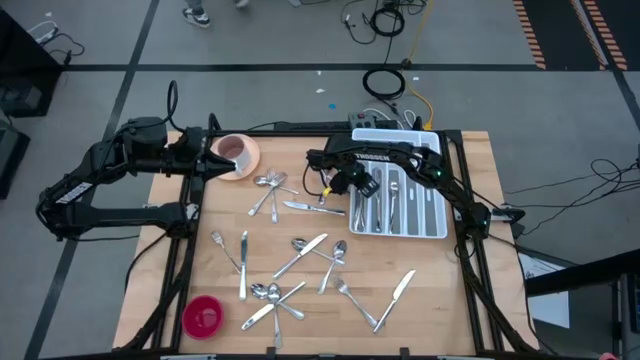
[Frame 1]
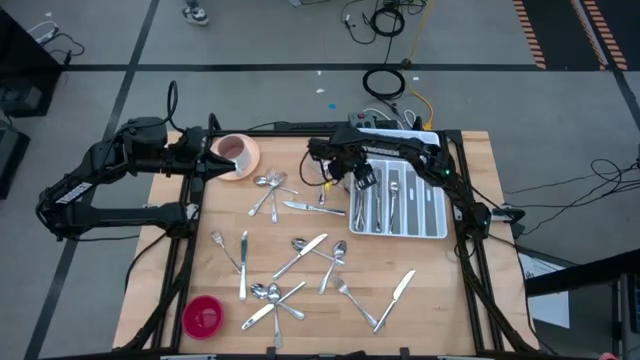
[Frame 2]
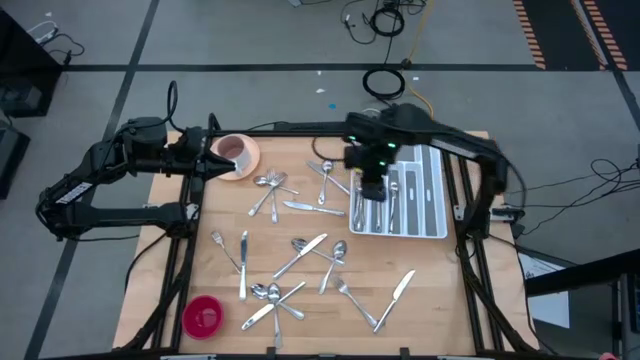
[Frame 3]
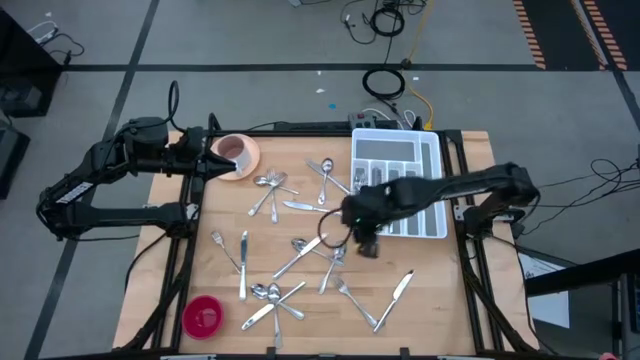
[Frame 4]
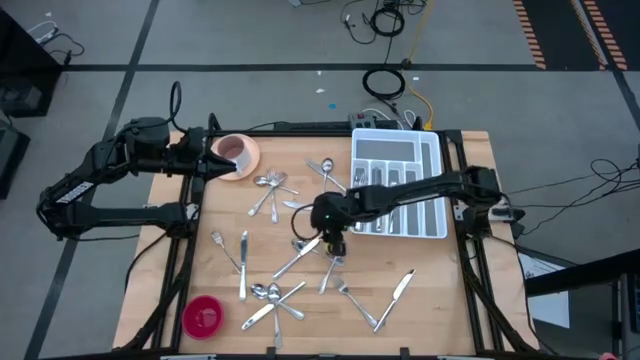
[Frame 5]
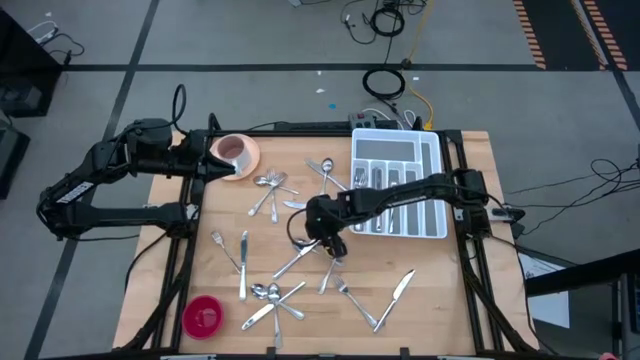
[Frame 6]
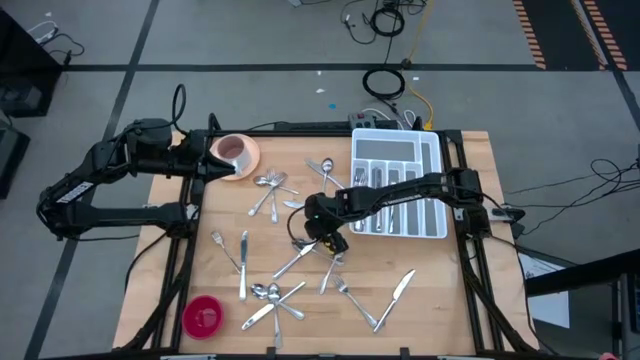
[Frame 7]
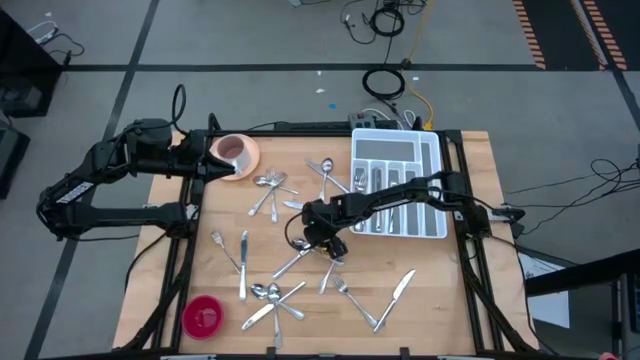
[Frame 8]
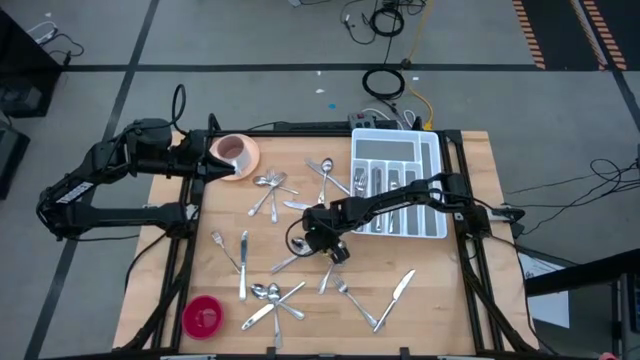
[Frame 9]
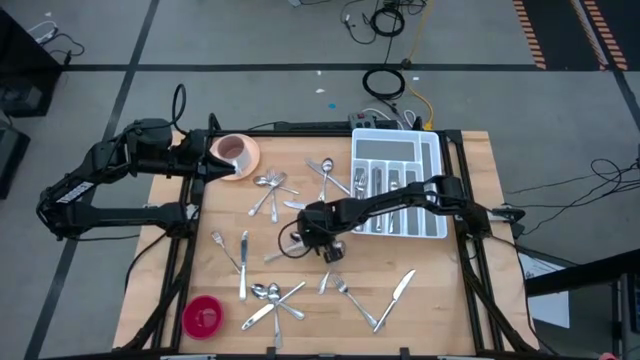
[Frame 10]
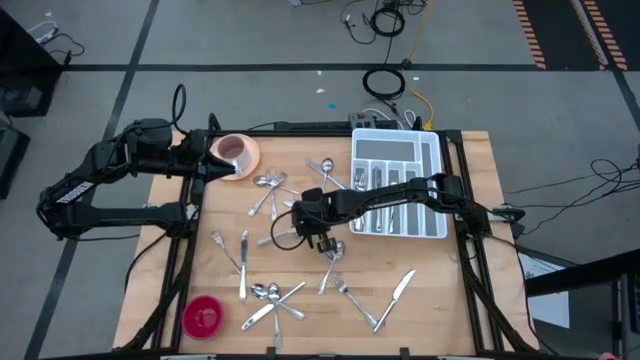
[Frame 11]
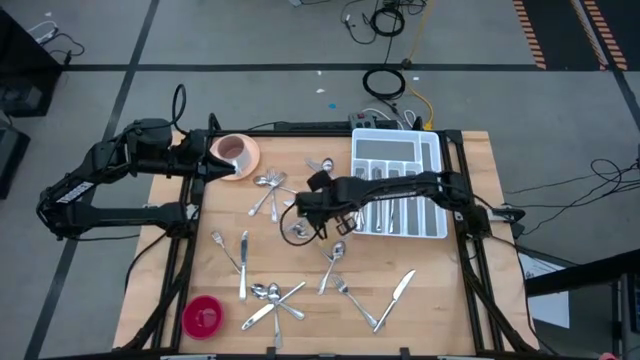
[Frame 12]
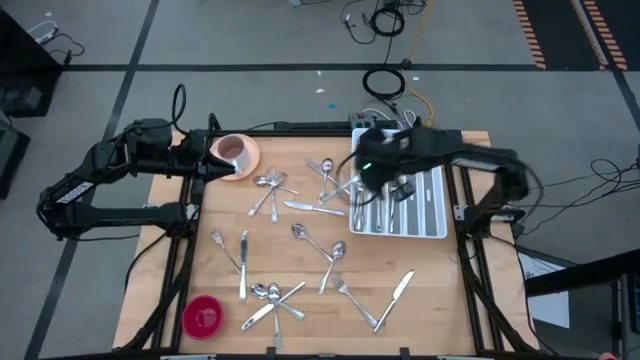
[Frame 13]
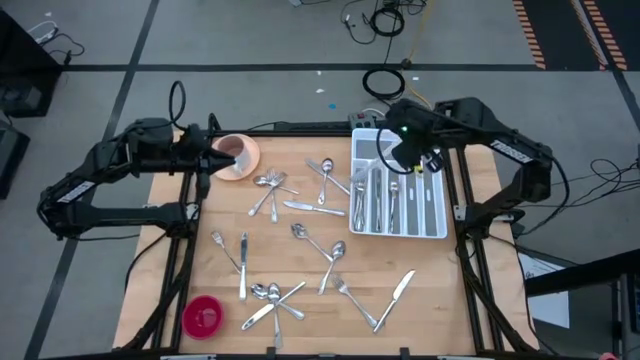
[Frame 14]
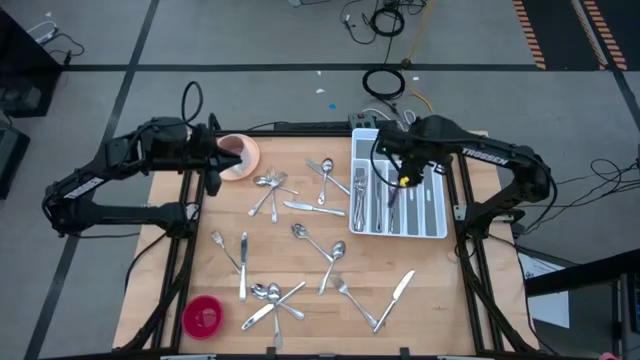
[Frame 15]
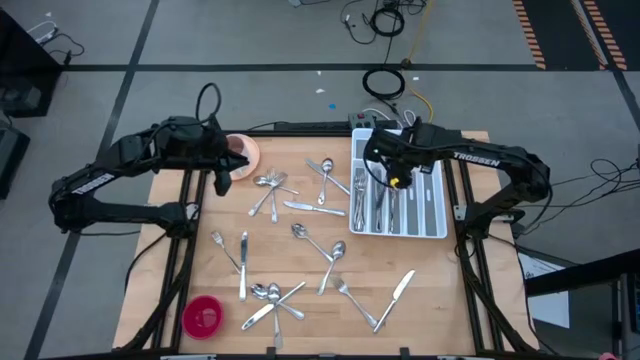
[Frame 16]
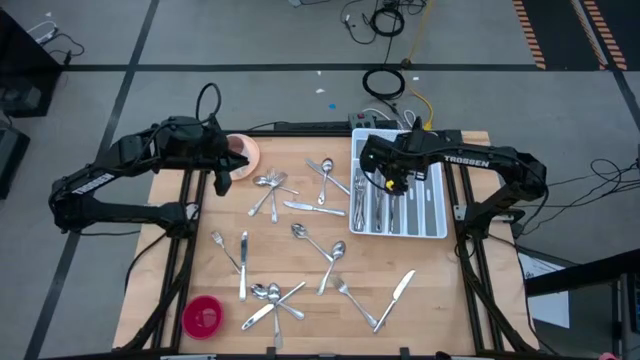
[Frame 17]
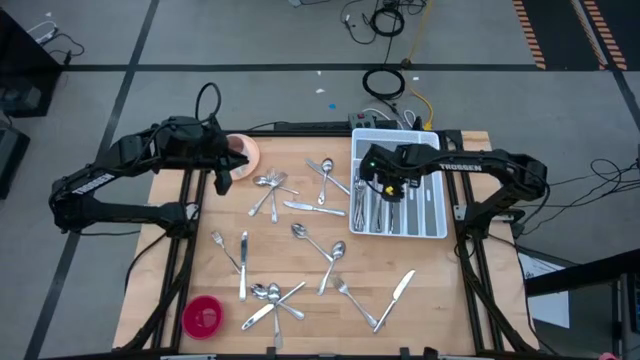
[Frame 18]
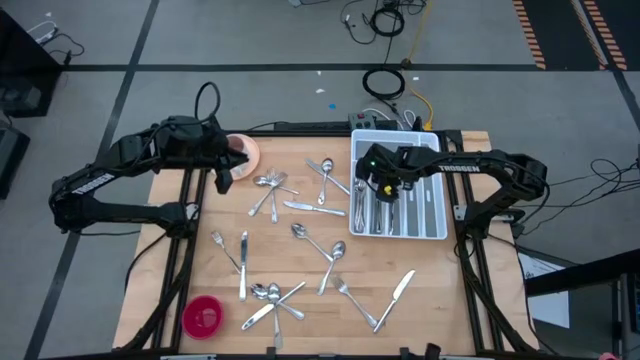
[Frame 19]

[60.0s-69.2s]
Task: Sort silverware
Put the silver knife into the white silverware tray

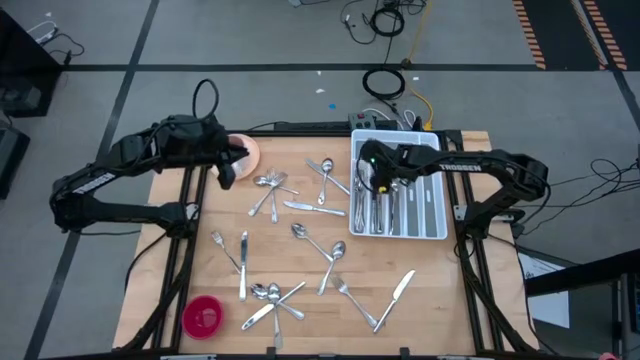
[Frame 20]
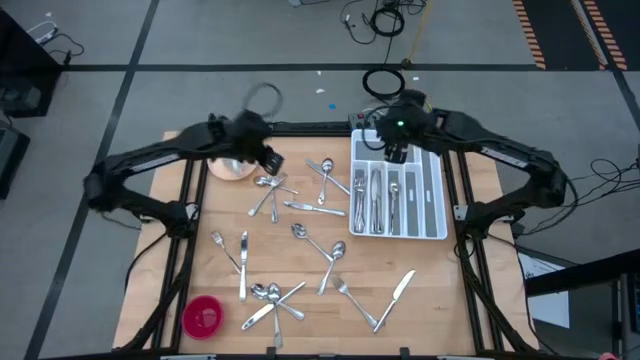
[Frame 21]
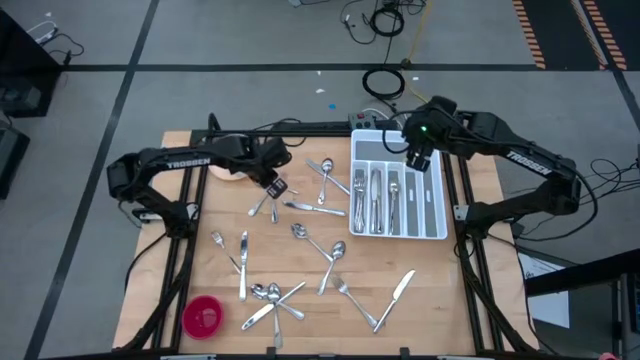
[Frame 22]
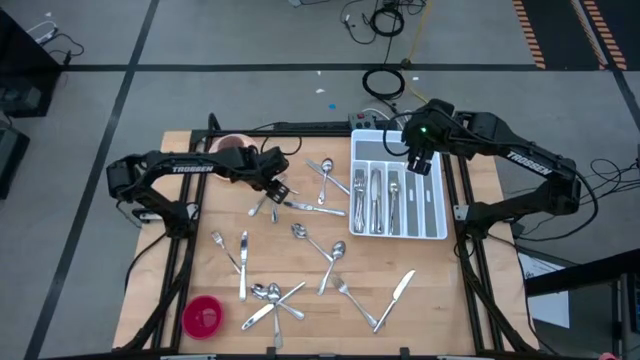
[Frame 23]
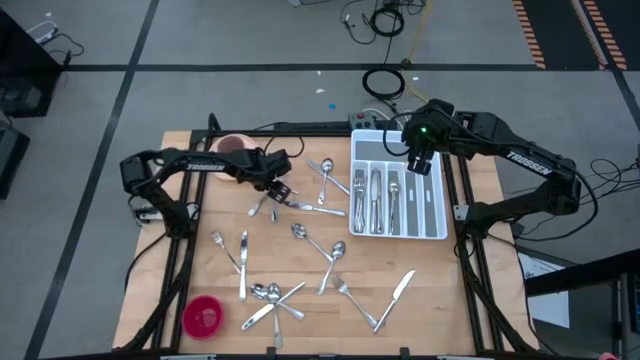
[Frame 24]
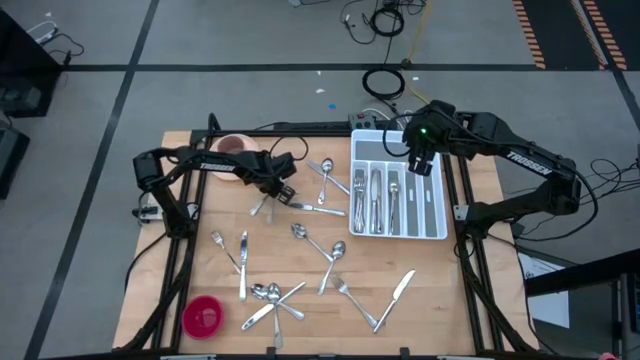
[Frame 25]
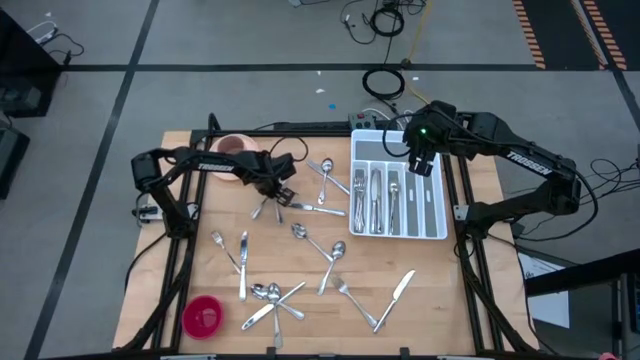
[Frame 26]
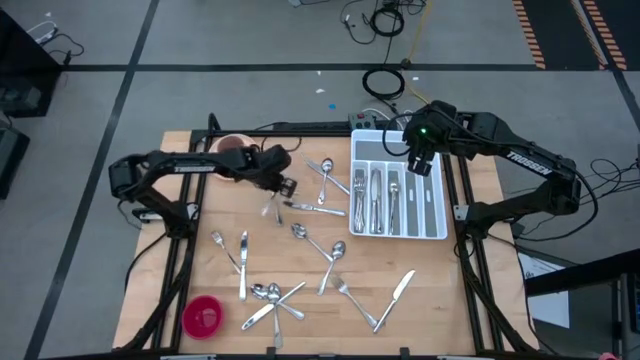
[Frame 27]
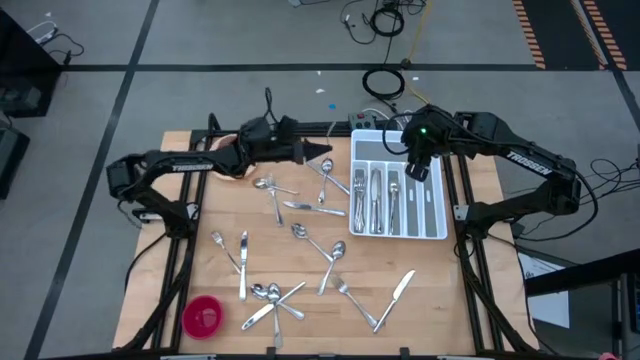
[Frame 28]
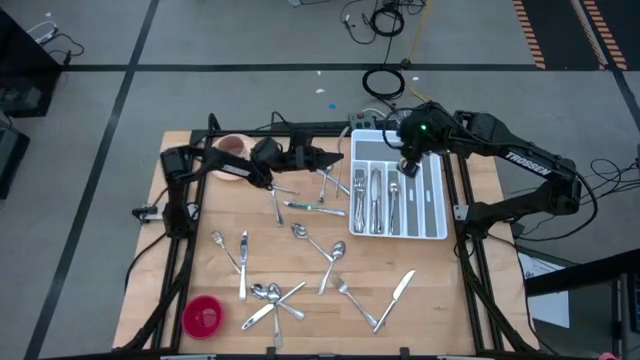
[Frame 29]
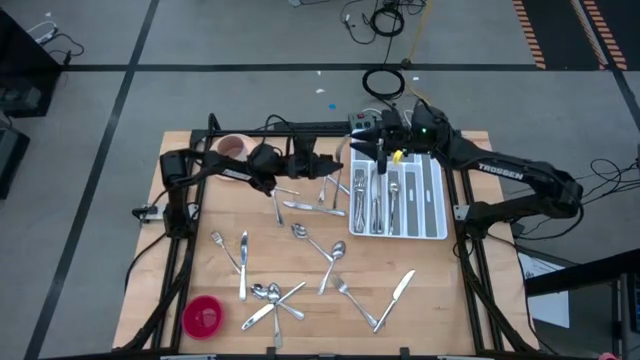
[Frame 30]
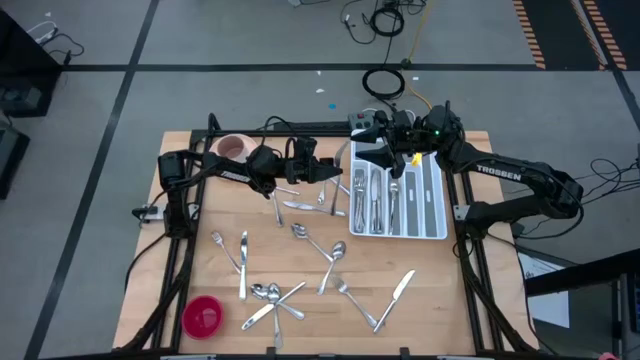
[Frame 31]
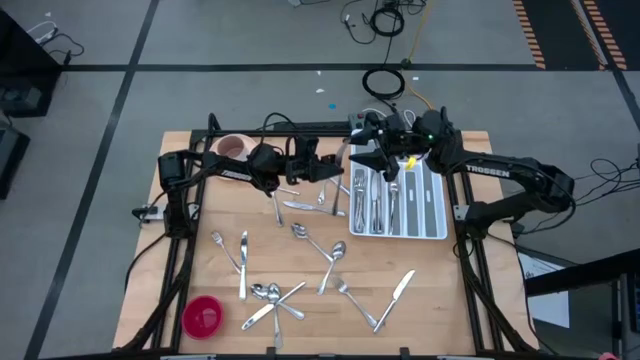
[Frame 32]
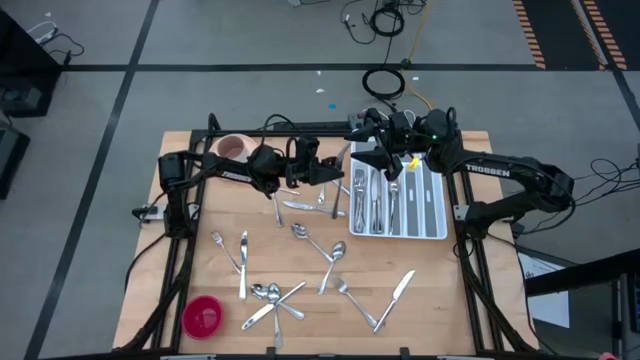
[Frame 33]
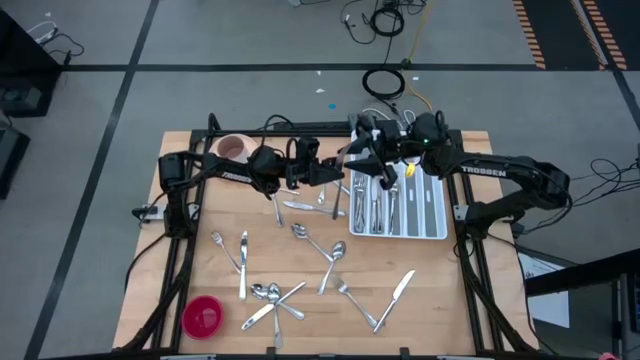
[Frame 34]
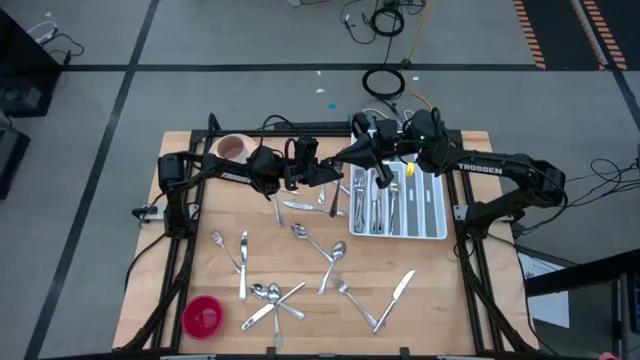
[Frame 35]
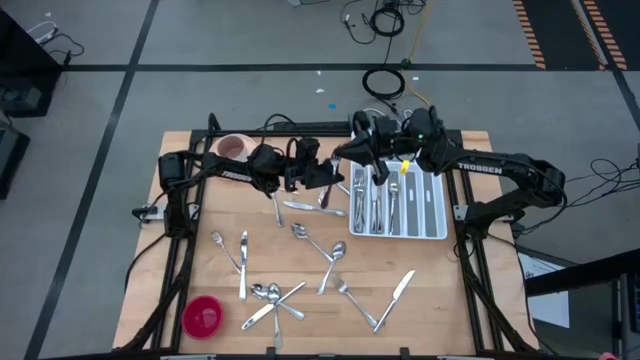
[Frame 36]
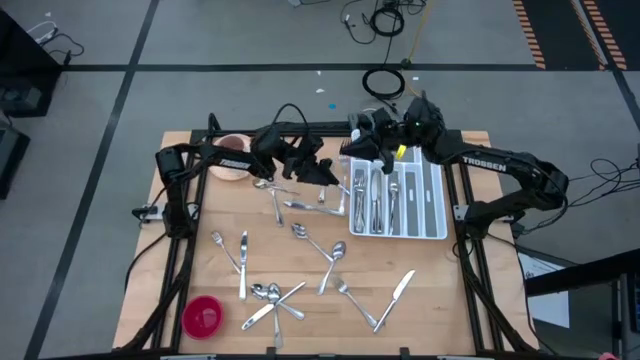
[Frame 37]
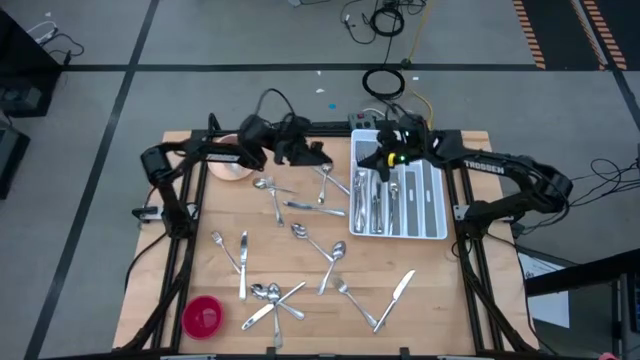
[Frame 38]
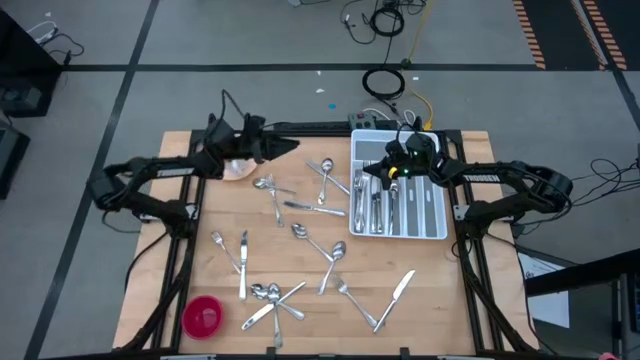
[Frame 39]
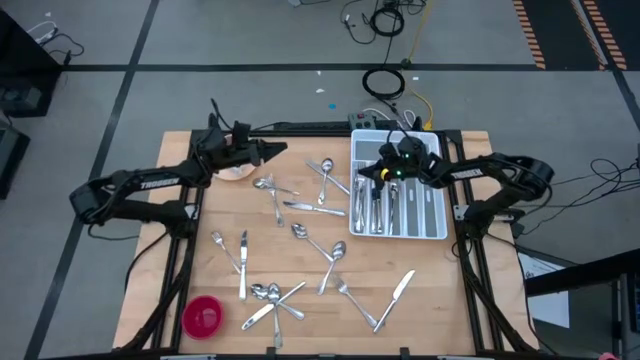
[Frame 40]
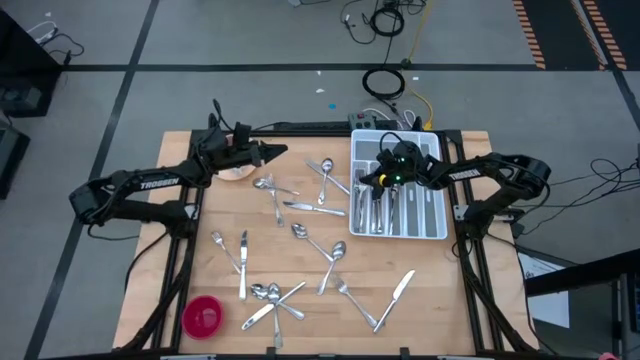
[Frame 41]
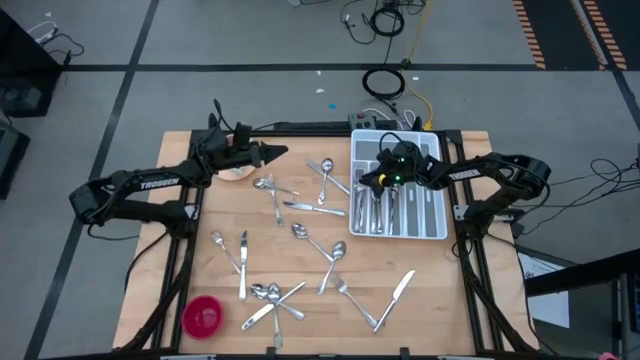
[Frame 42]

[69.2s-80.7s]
Put the silver fork into the white silverware tray
